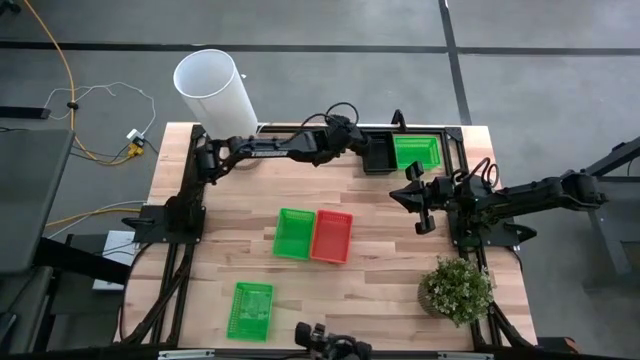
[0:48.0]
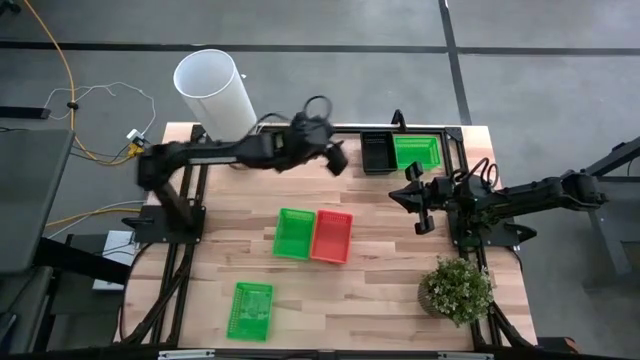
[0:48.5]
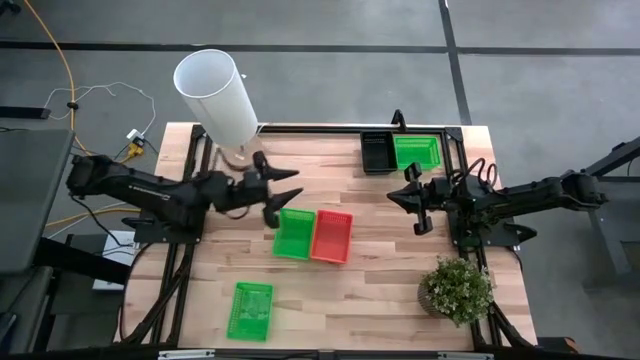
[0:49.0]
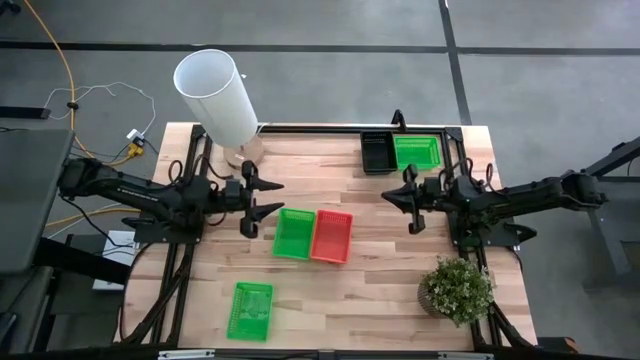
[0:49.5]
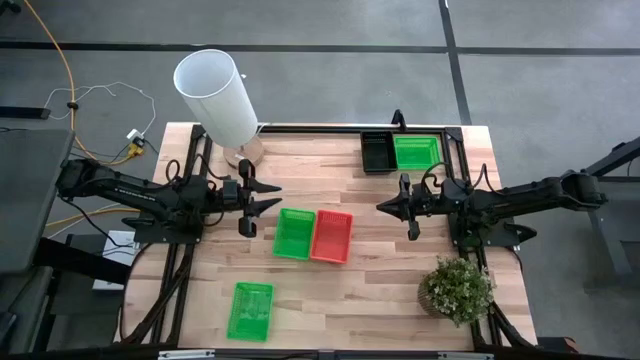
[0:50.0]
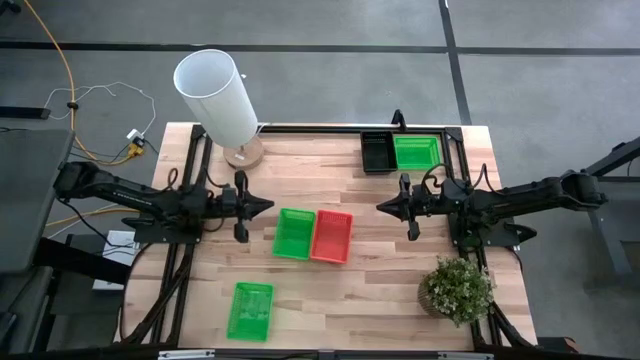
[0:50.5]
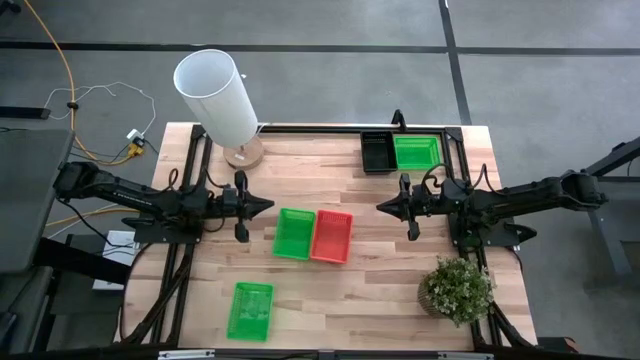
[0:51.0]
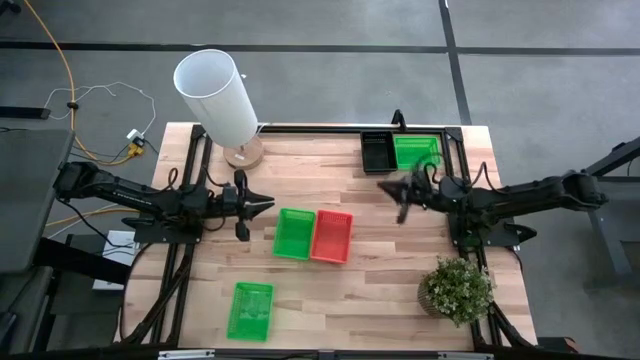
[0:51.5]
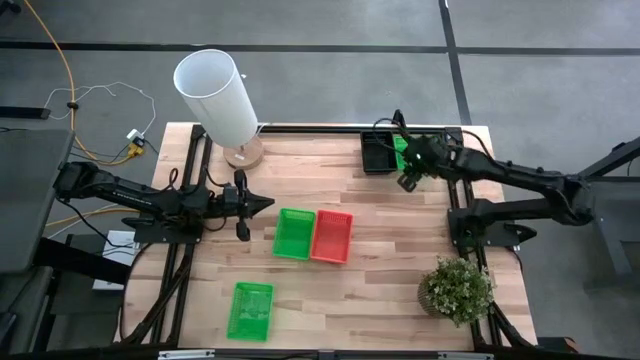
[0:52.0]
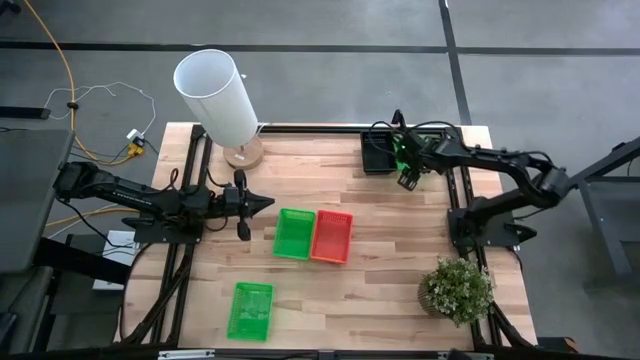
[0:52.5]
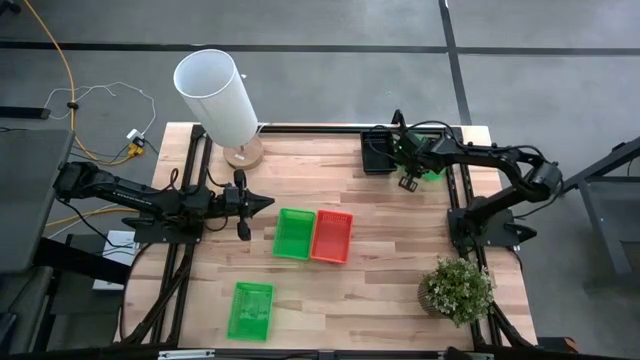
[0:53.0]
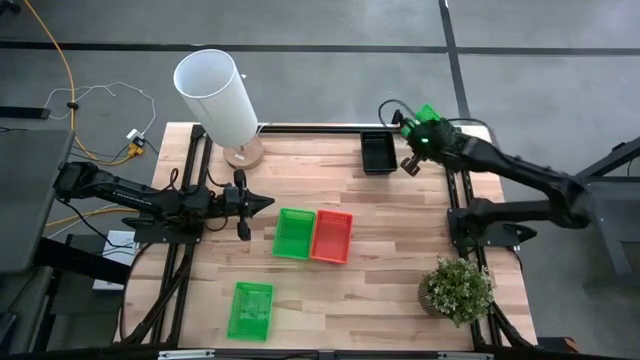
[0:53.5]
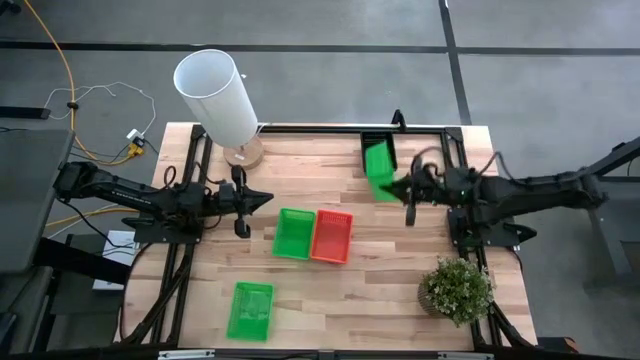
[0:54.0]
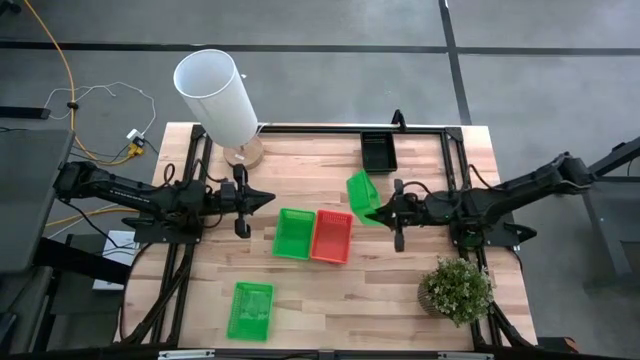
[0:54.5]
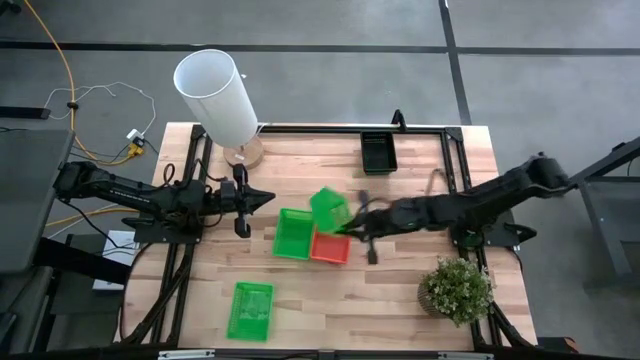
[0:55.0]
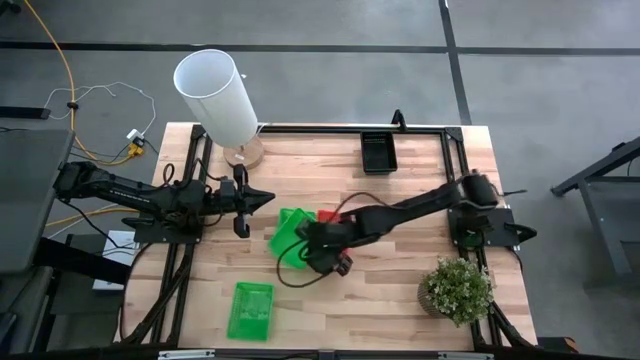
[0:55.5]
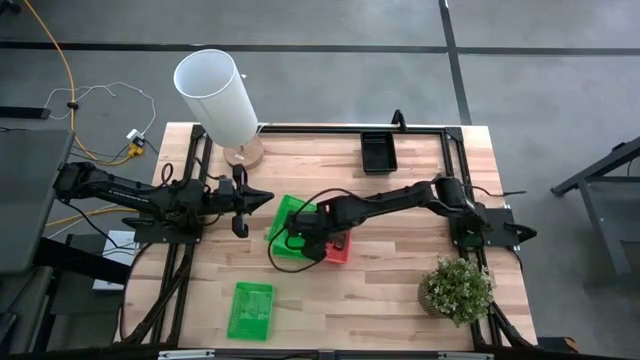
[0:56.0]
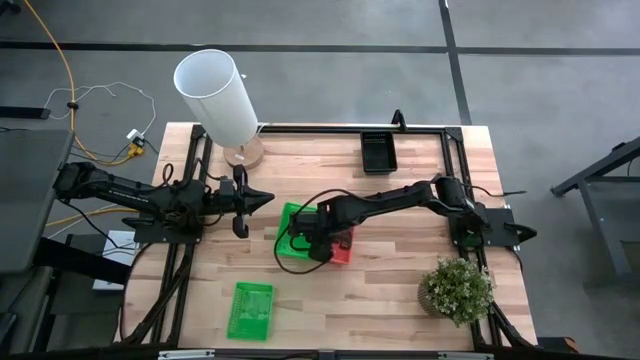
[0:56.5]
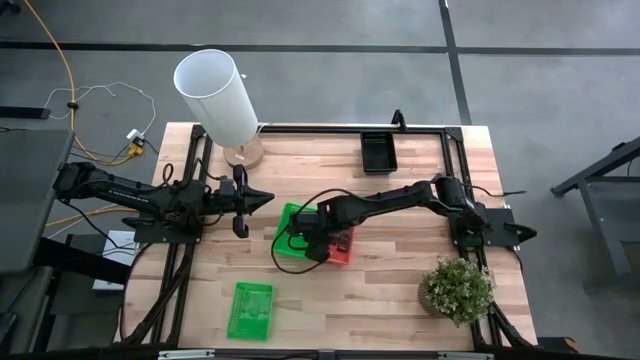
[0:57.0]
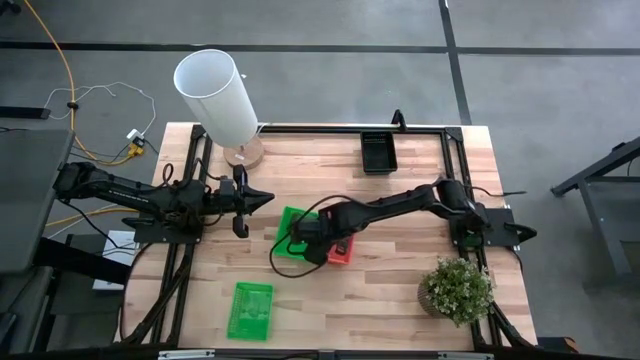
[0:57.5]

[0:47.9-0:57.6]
Stack the top green bin on top of the middle green bin

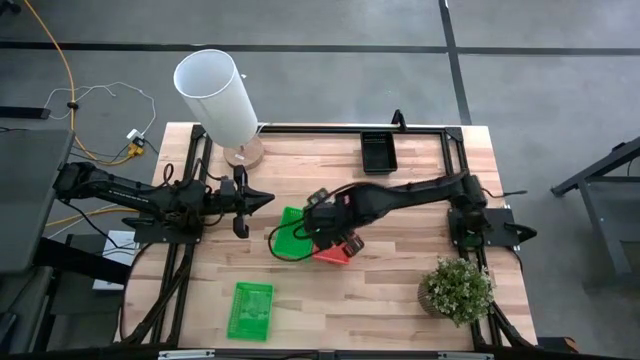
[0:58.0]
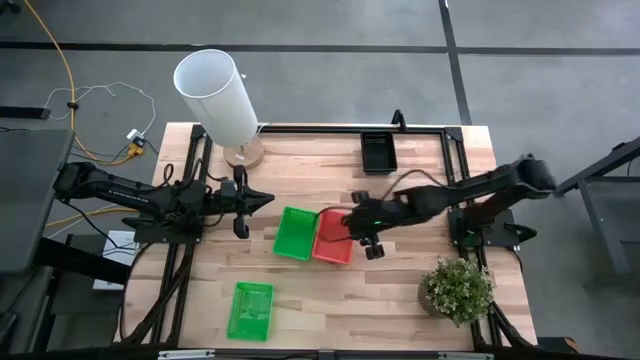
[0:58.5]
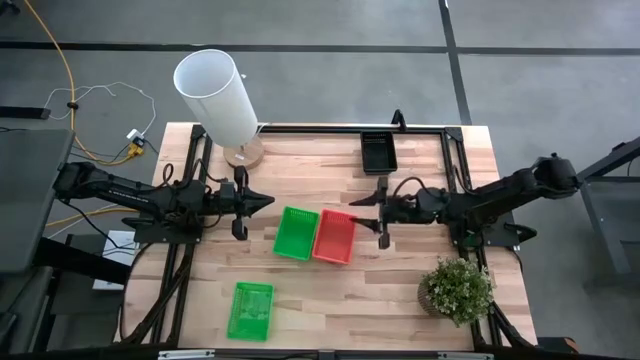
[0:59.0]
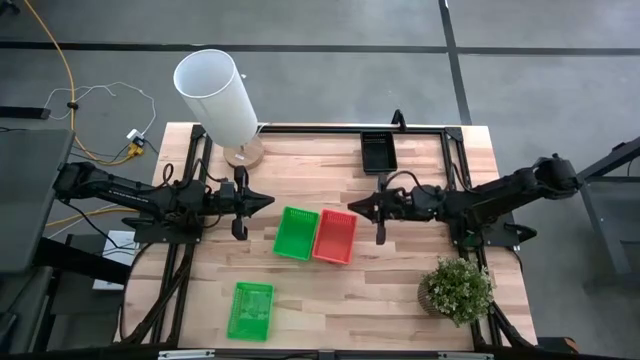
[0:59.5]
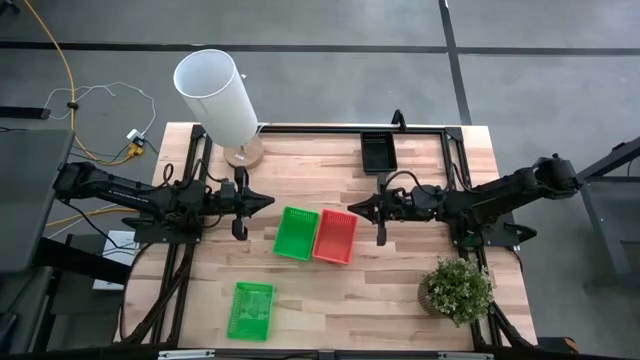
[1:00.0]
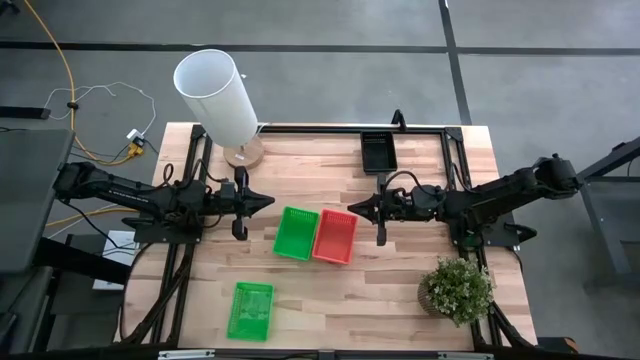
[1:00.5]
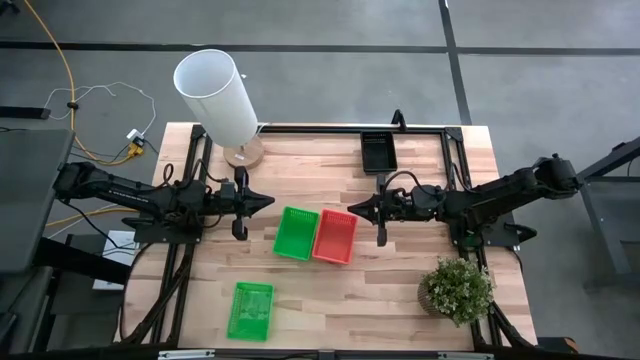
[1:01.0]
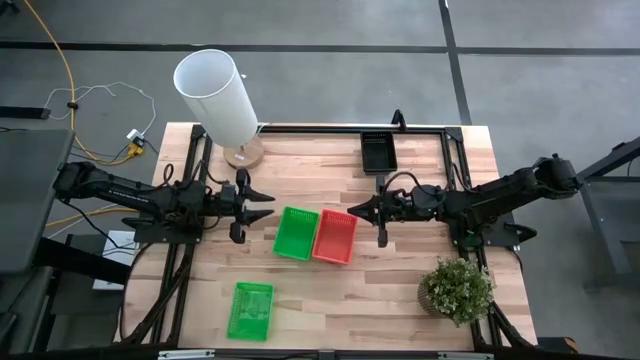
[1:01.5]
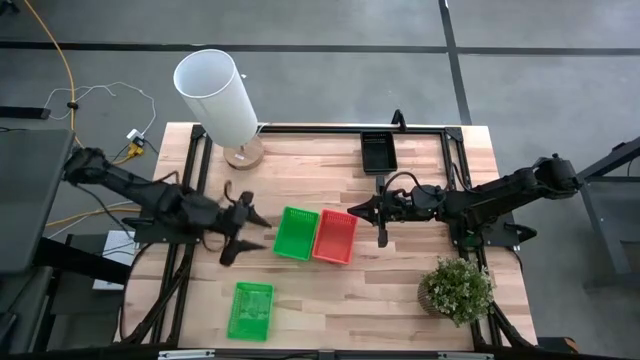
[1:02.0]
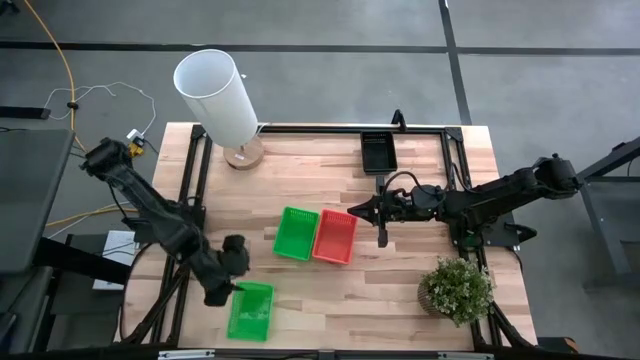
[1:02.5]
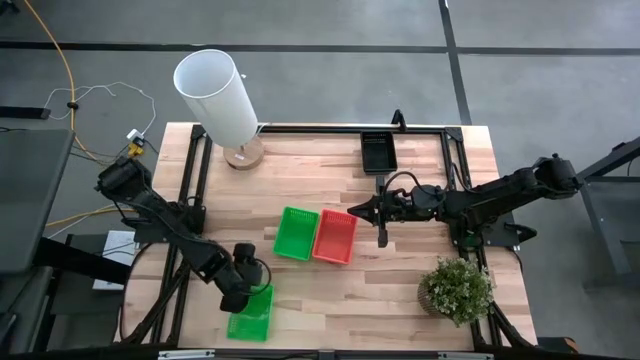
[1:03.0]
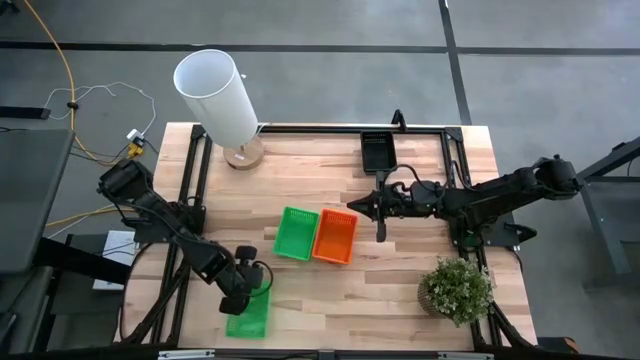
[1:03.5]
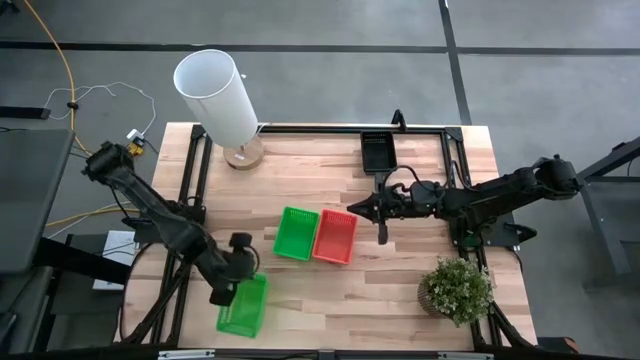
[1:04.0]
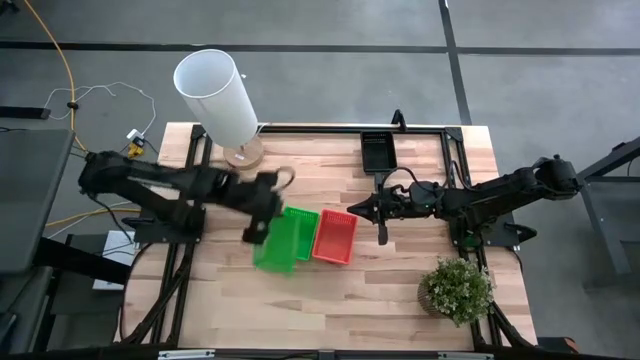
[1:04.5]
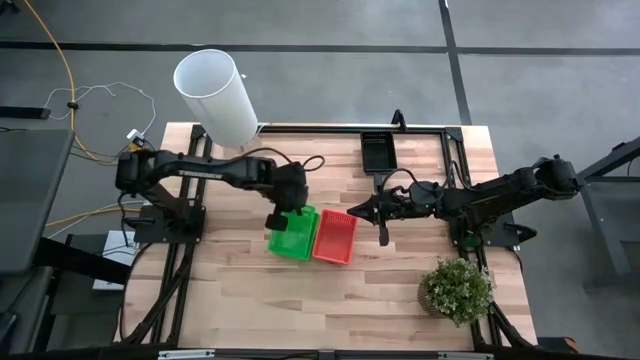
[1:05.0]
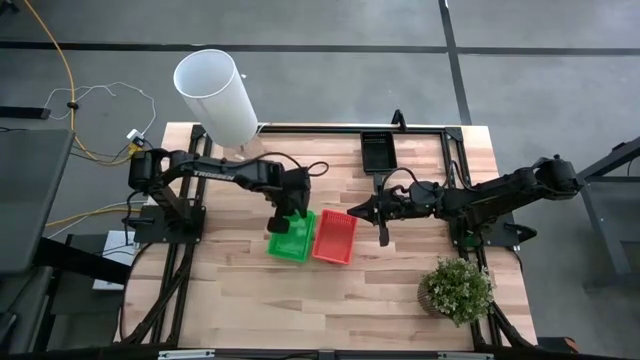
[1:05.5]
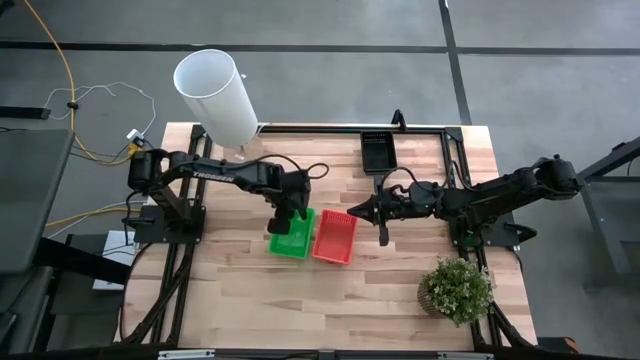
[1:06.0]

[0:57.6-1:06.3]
Stack the bottom green bin on top of the top green bins
